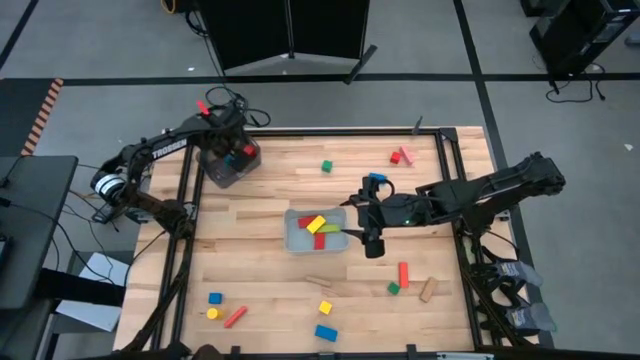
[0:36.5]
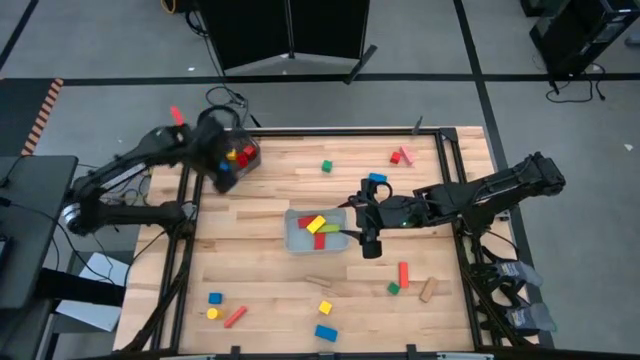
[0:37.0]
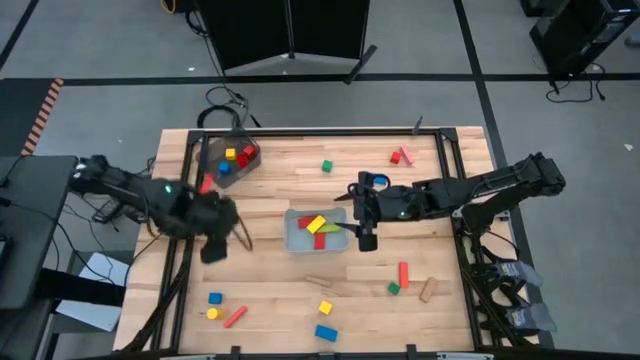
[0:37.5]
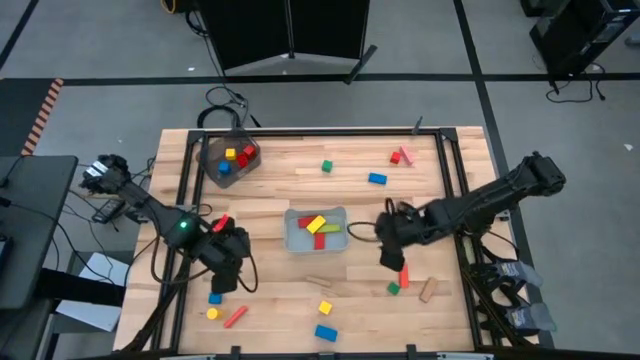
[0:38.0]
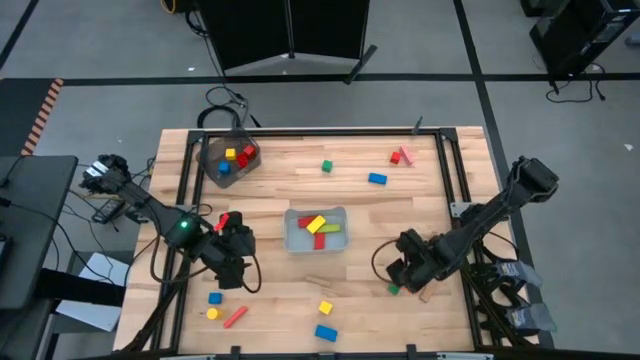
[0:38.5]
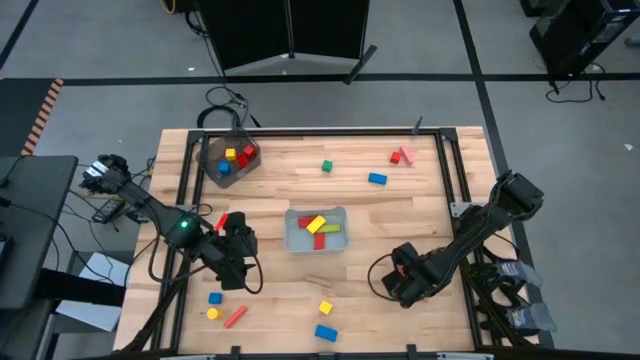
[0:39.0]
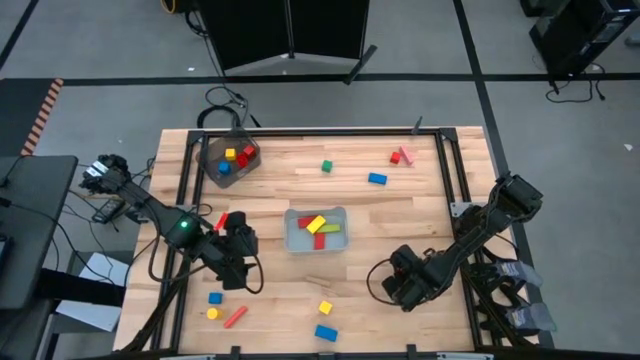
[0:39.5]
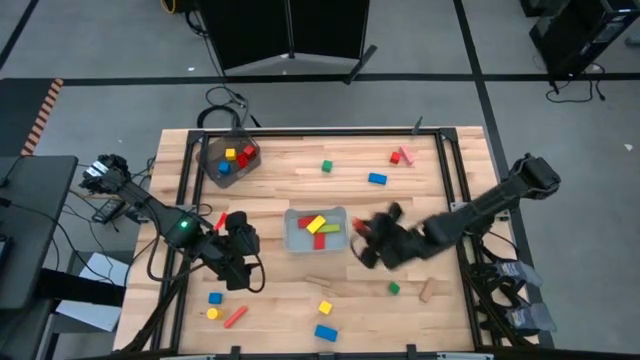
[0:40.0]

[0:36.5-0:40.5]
Task: Sort blocks by size
Put the red rectangular block into the gray bin

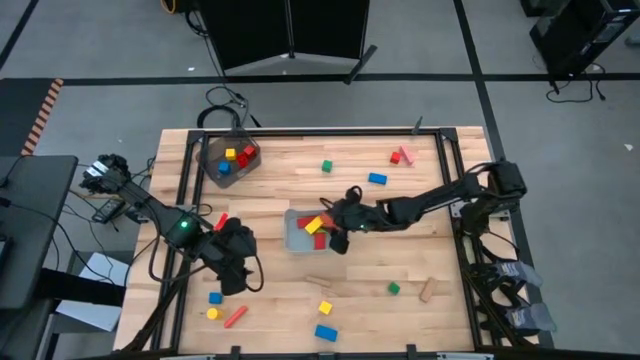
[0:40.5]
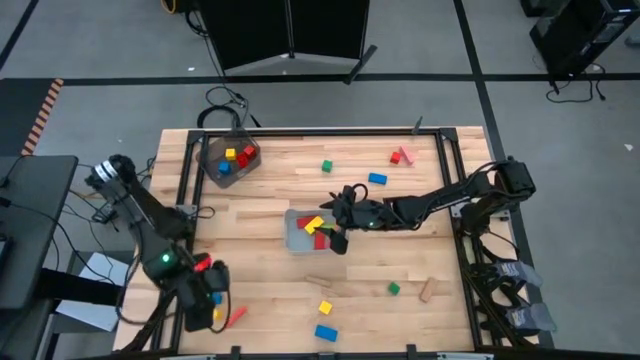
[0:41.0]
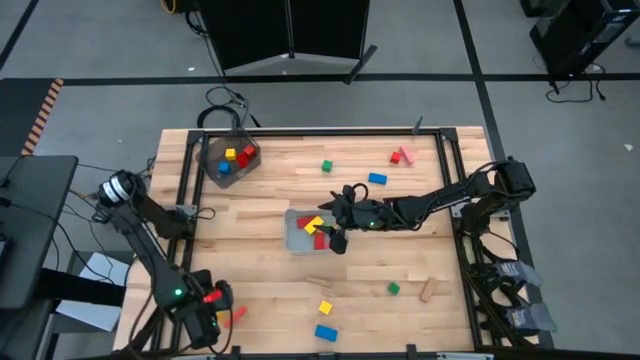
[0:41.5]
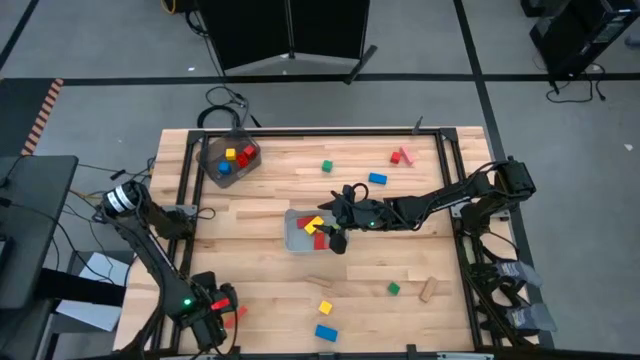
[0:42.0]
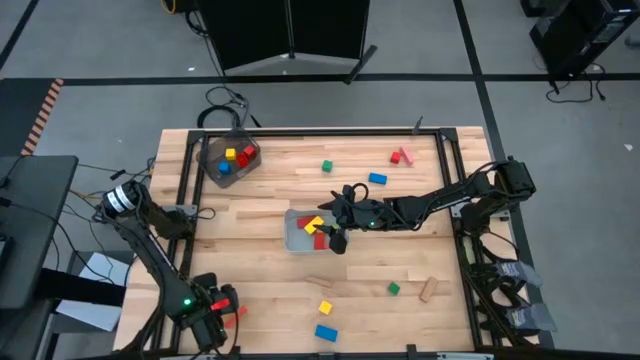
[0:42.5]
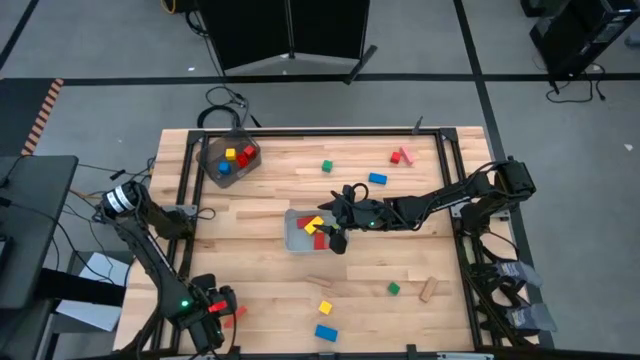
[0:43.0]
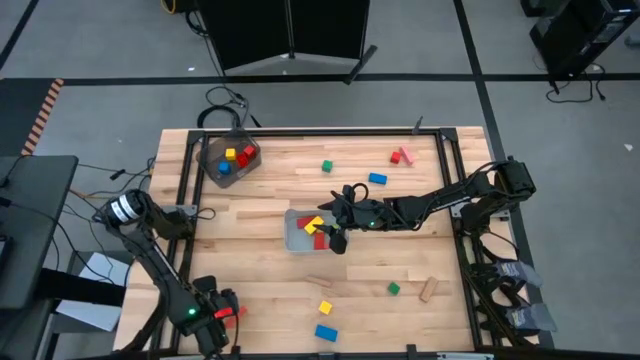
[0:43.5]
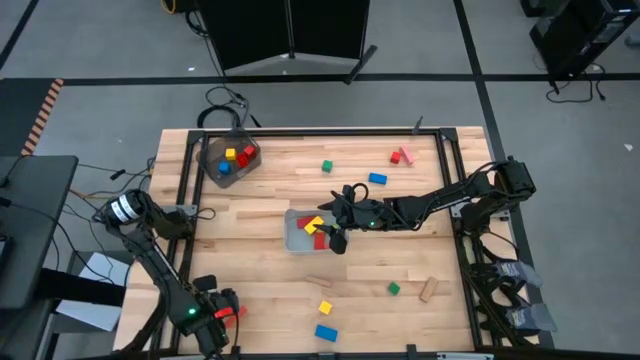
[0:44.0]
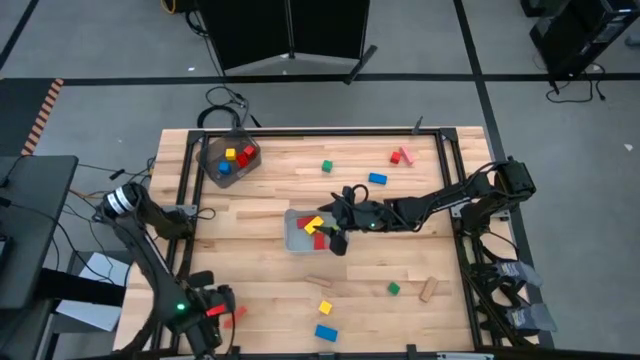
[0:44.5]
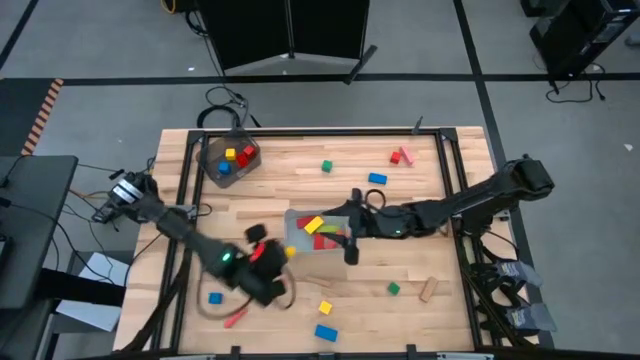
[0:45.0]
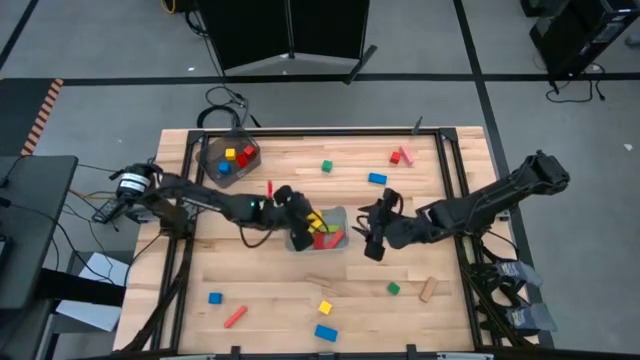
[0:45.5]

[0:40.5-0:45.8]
Put the yellow cylindrical block into the gray bin

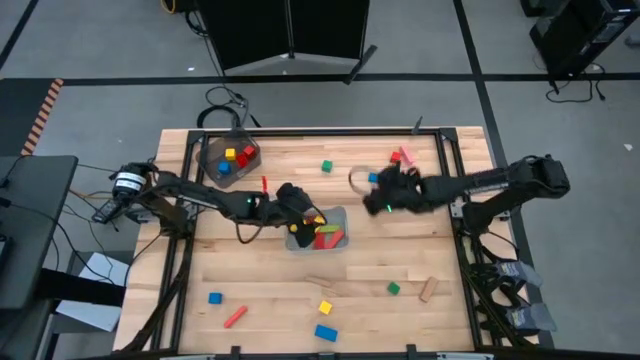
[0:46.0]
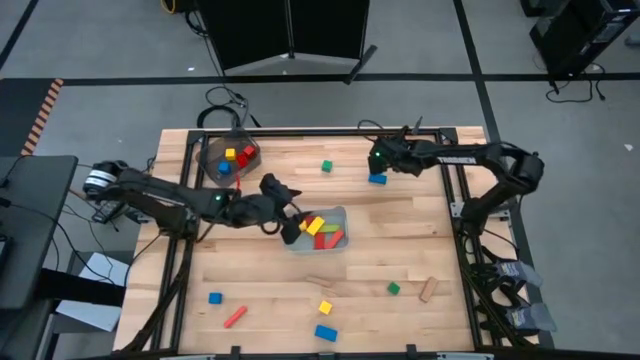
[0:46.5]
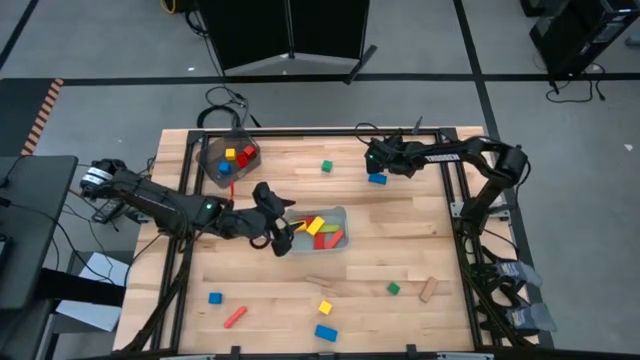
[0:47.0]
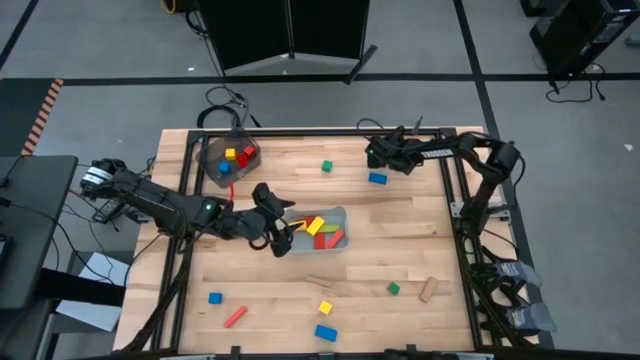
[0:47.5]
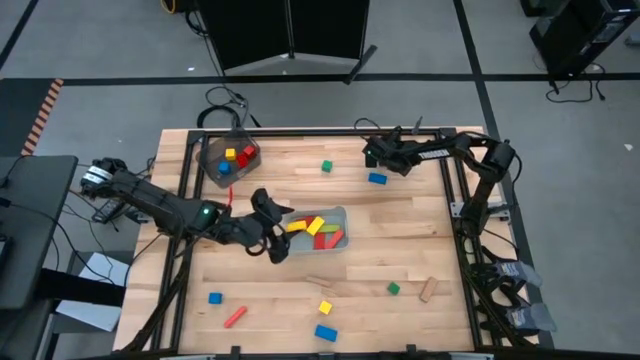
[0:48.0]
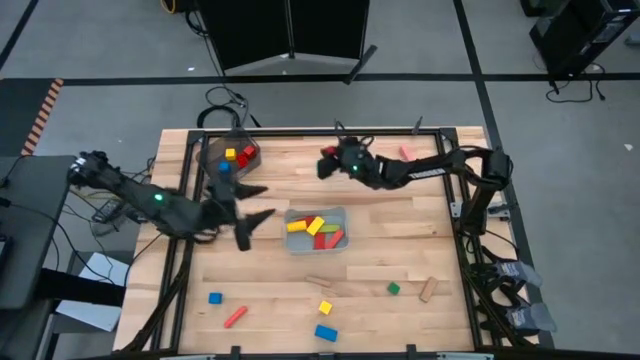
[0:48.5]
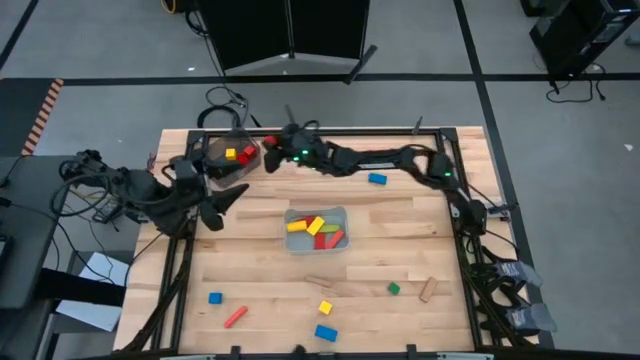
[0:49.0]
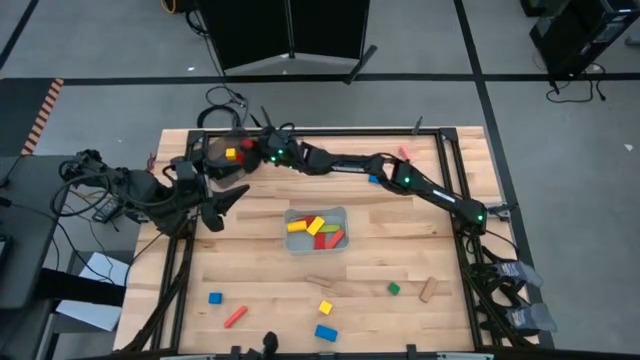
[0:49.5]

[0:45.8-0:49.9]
Put the red cube block into the black bin

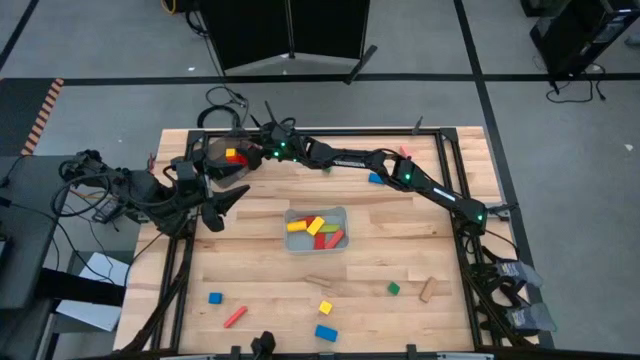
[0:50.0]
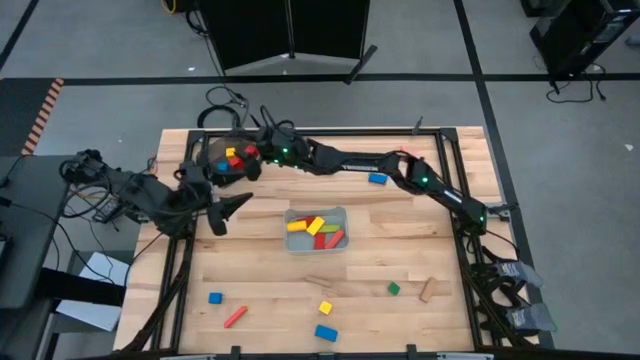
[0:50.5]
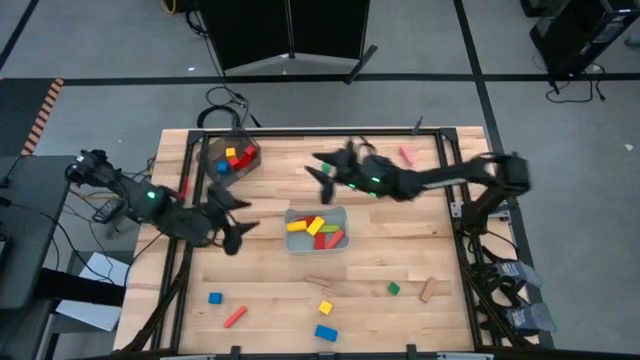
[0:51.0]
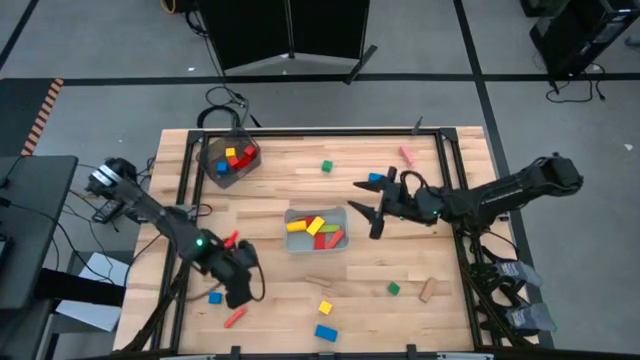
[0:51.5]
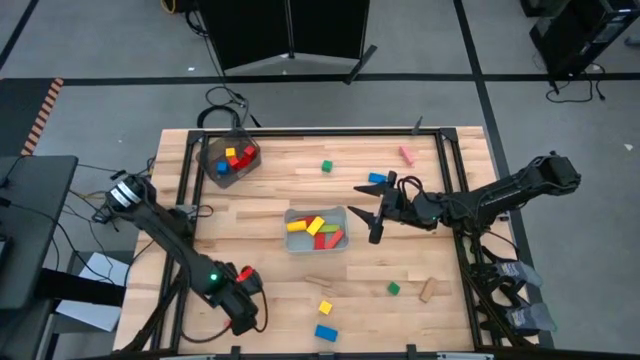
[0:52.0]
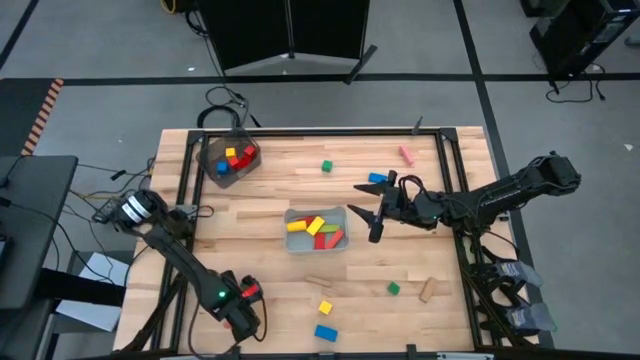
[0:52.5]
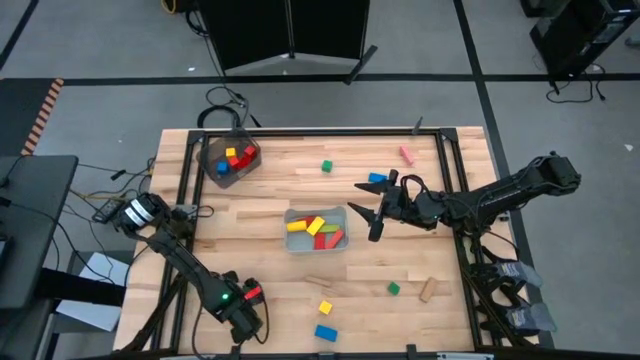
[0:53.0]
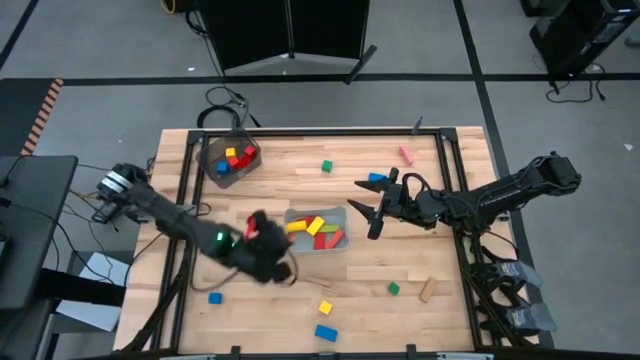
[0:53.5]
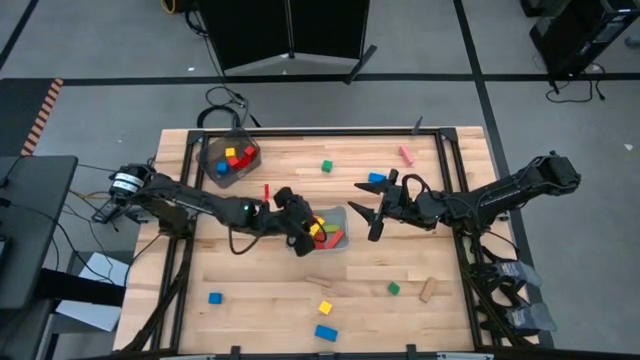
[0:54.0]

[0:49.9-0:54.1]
Put the orange rectangular block into the gray bin

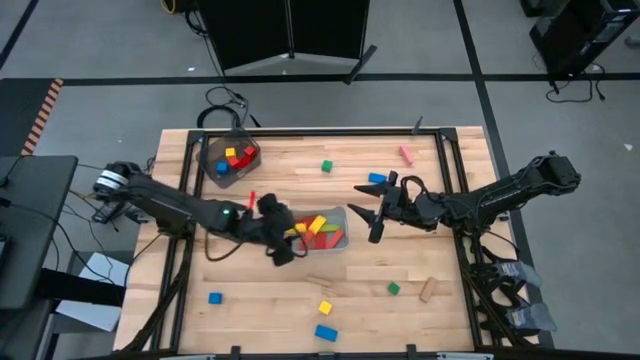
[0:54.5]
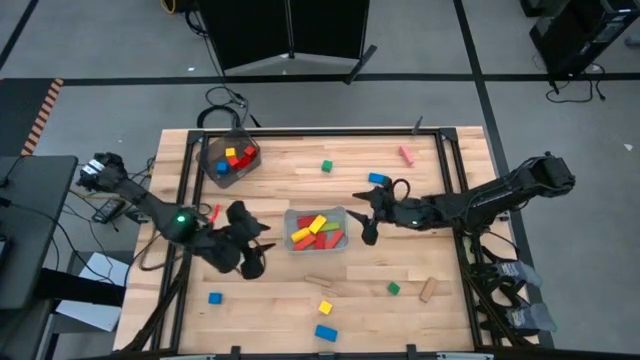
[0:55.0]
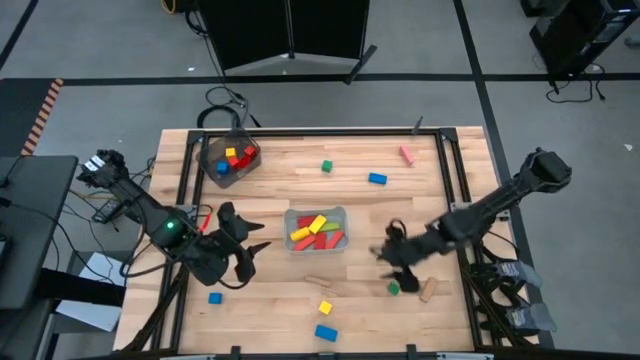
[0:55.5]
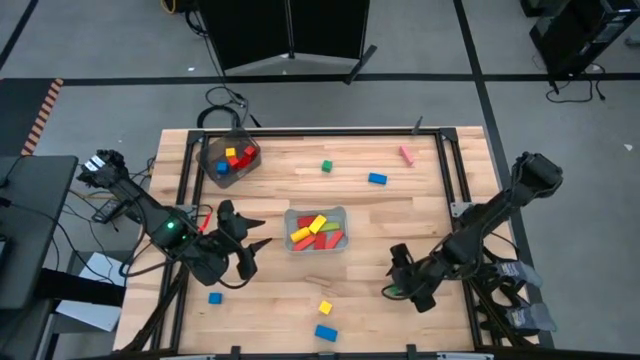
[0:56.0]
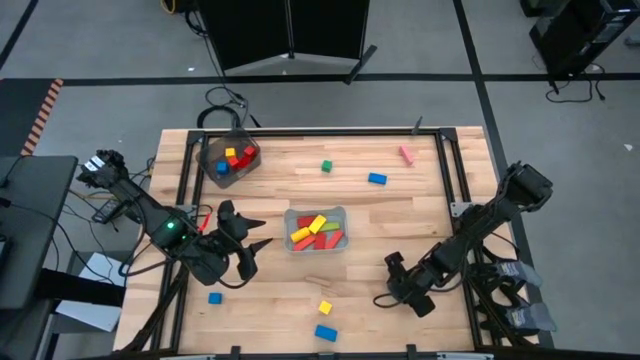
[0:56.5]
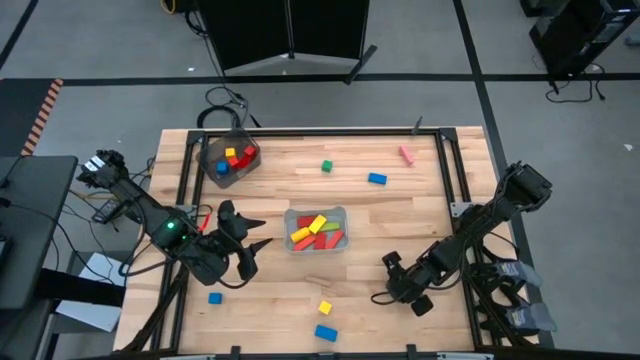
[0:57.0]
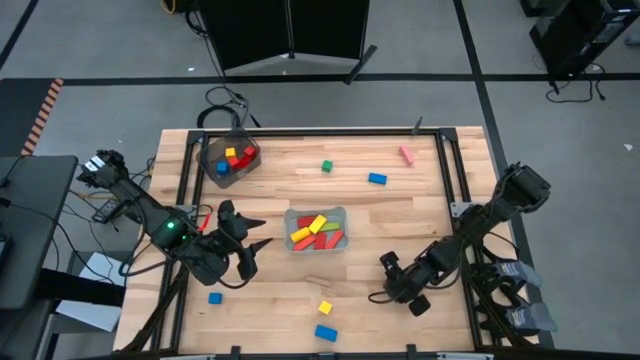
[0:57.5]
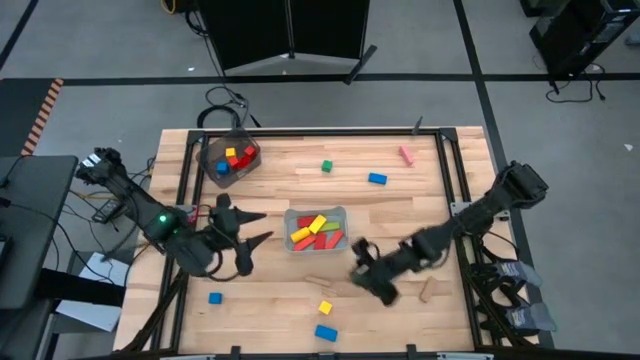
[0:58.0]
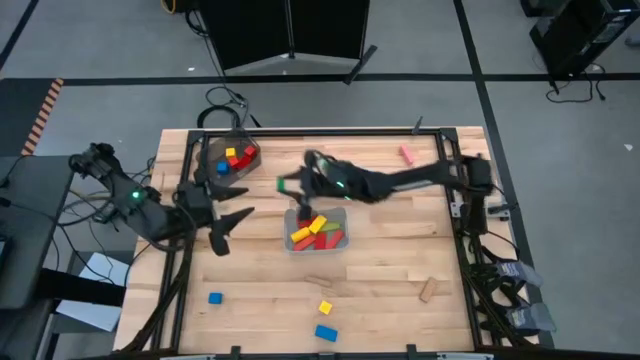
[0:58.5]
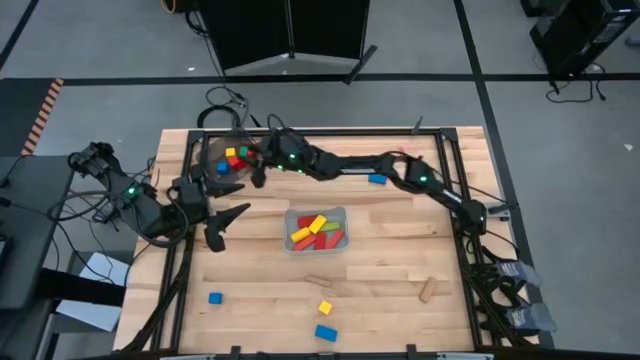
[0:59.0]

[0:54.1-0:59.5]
Put the green triangular block into the black bin
